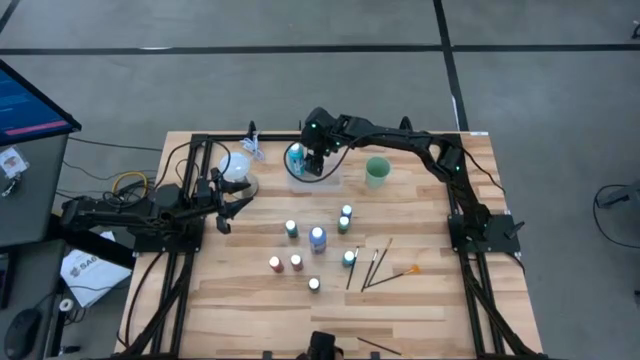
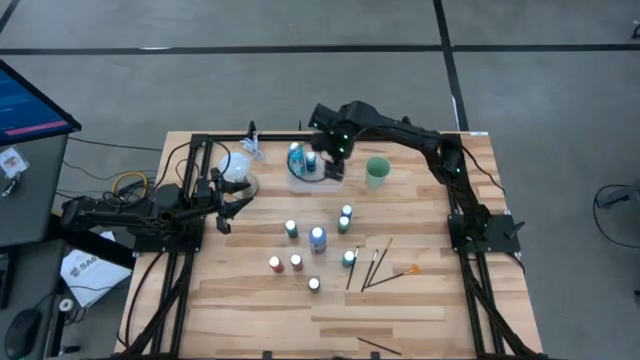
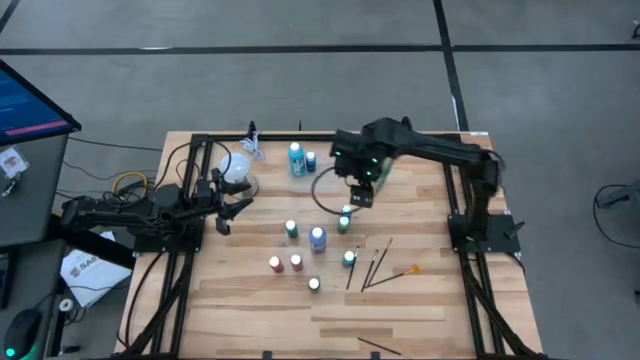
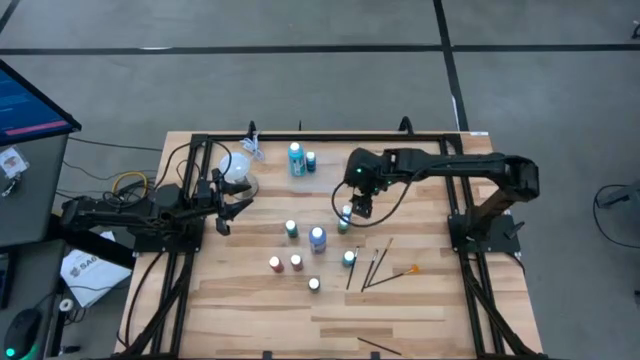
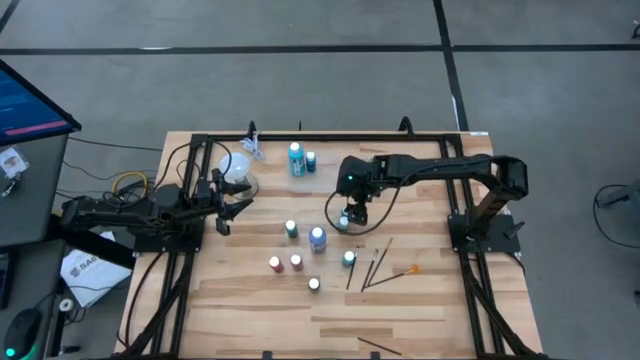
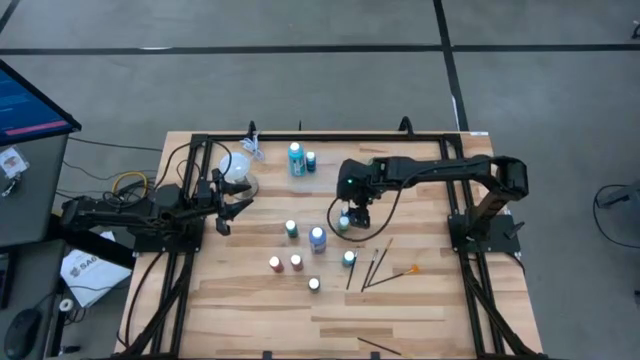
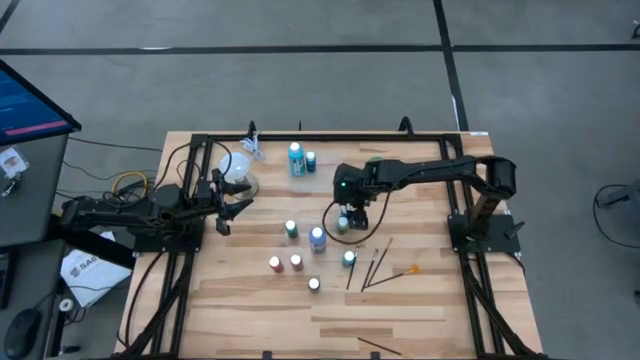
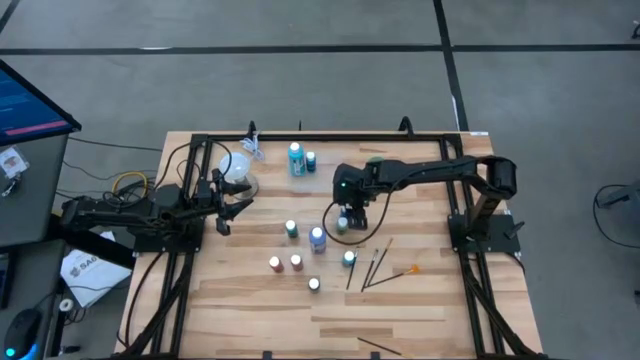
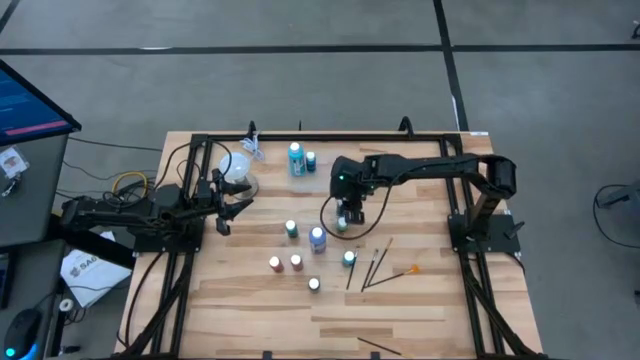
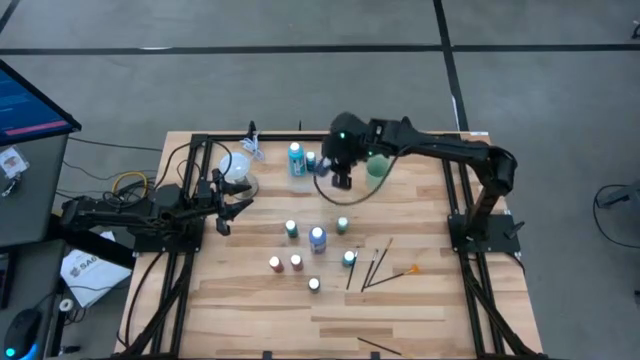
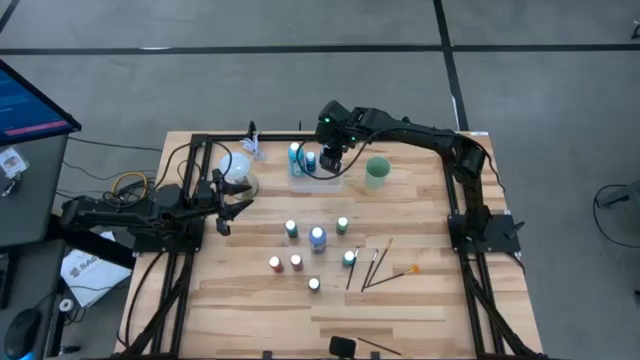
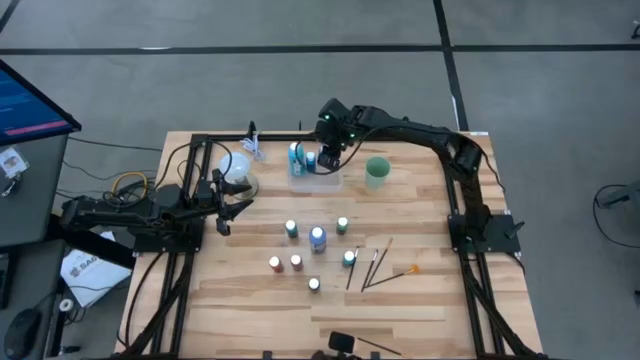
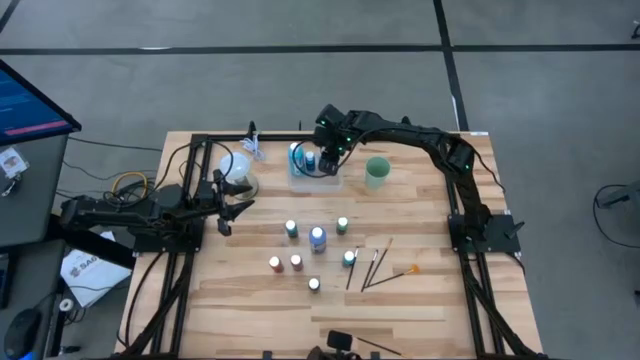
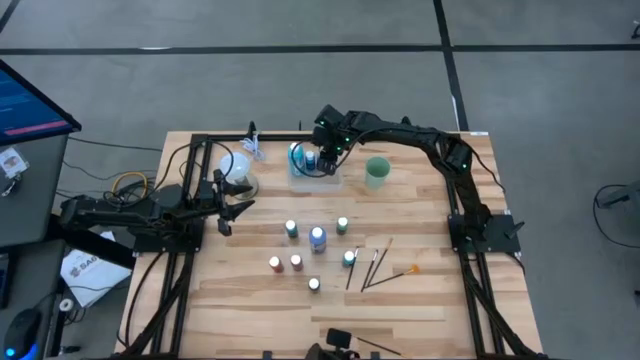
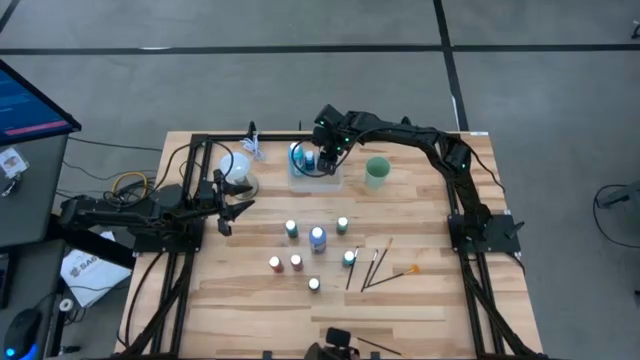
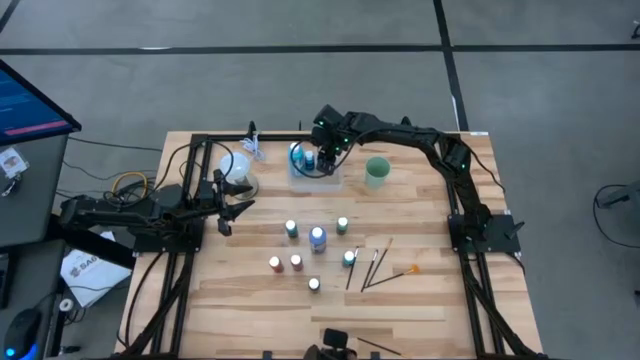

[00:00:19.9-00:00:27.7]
Task: Pick & Place Paint Supplies
Put the small dark blue paint bottle into the bin

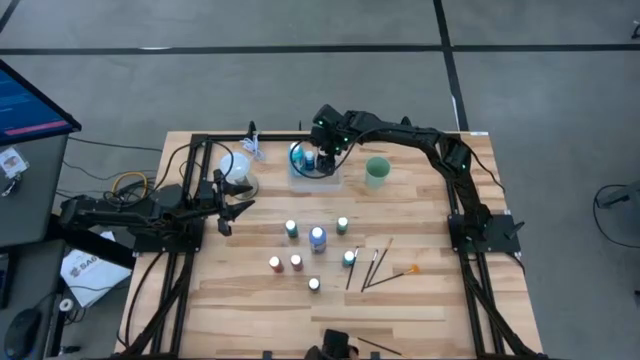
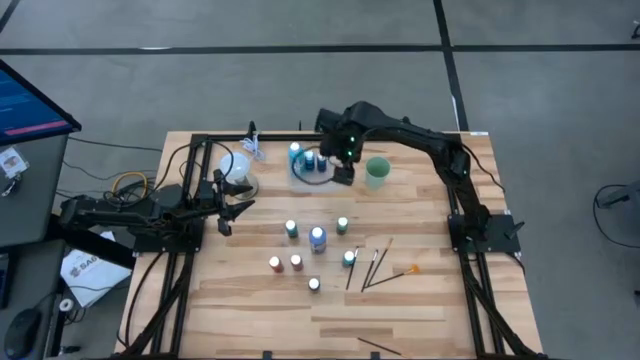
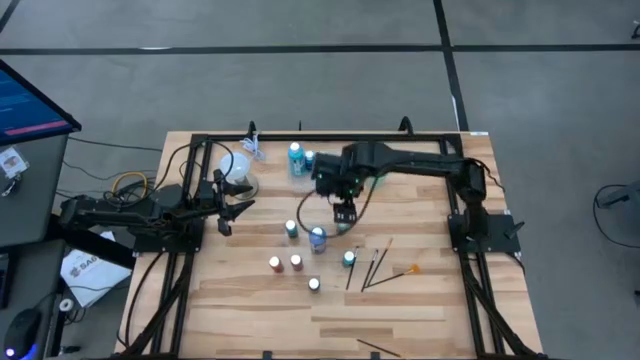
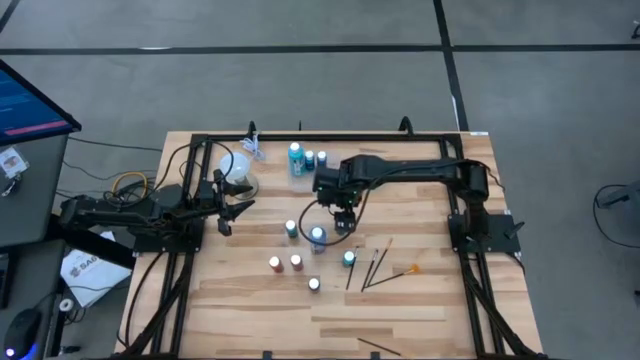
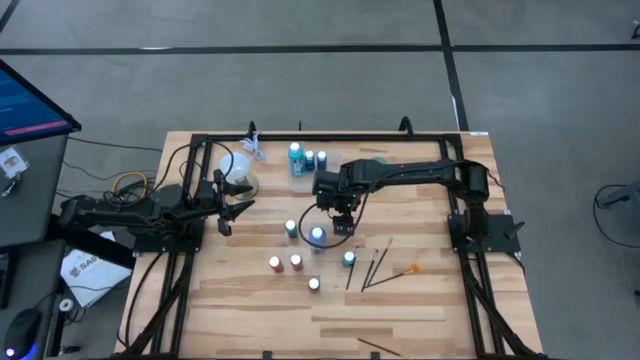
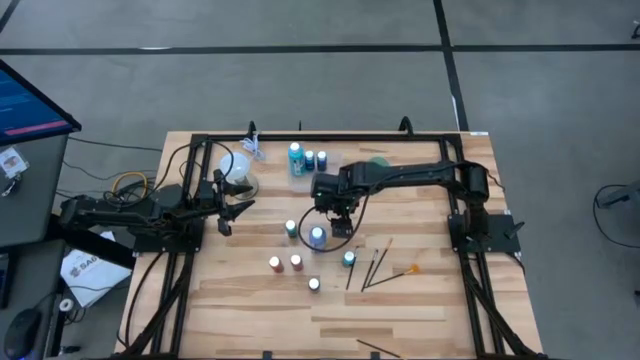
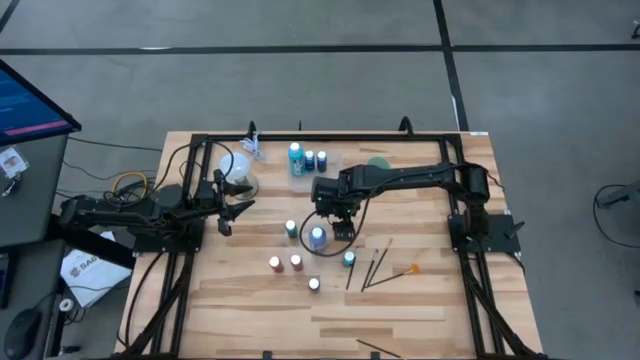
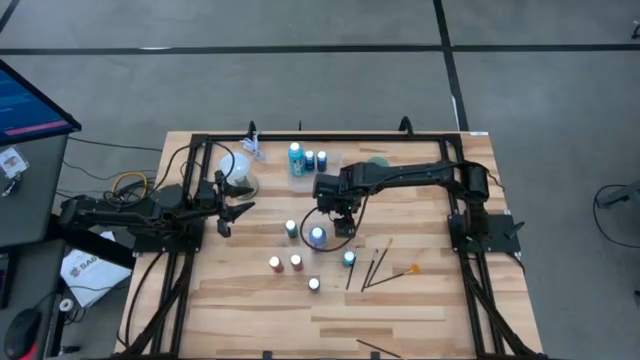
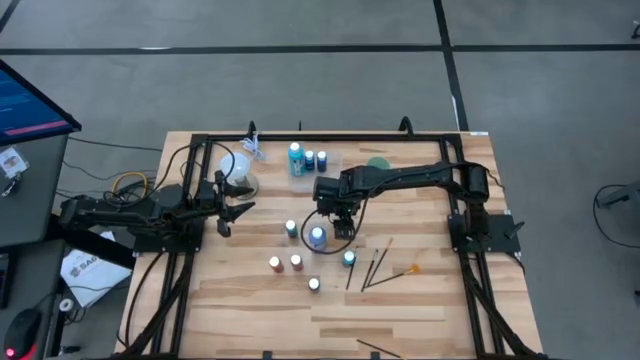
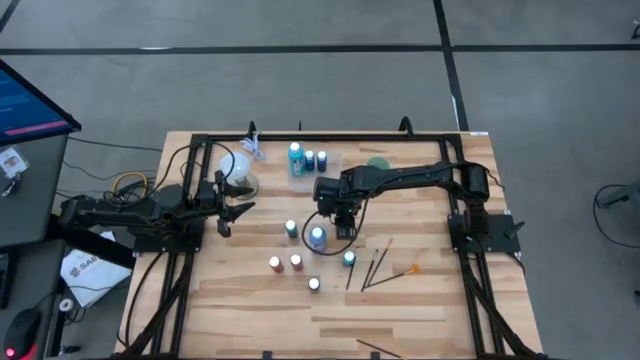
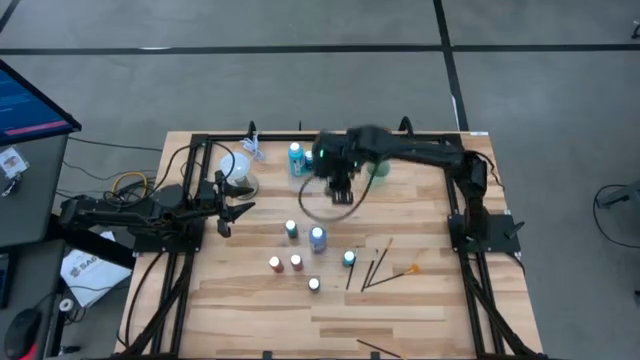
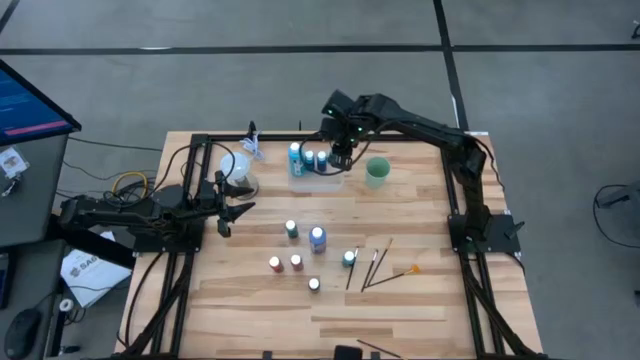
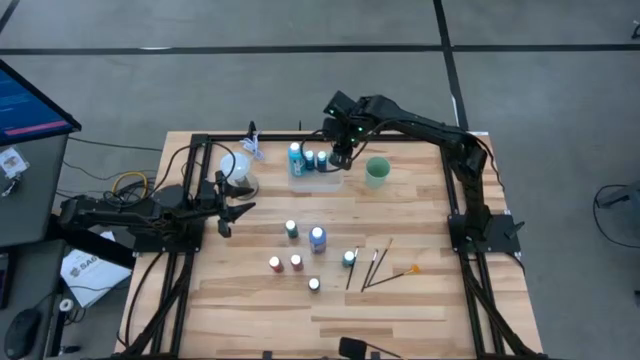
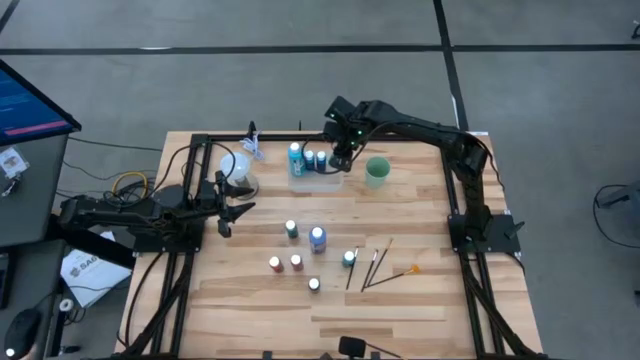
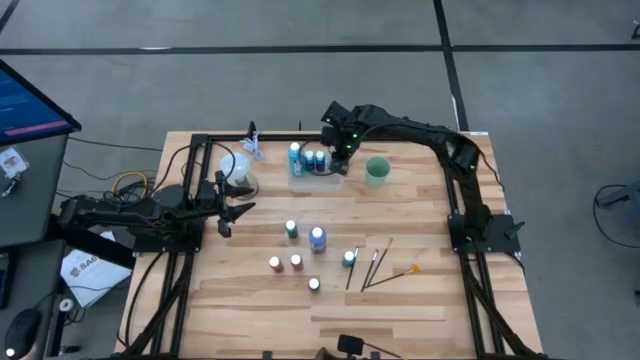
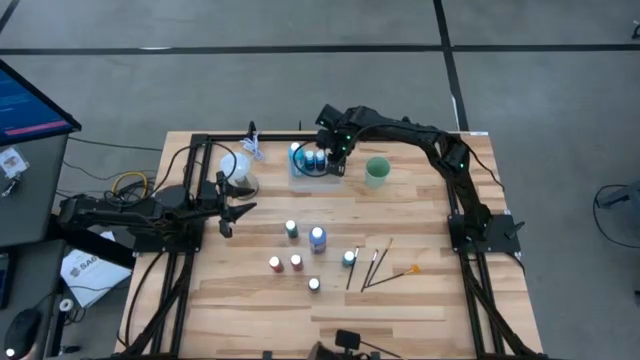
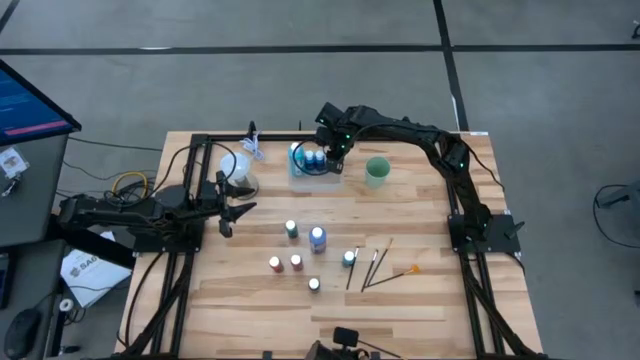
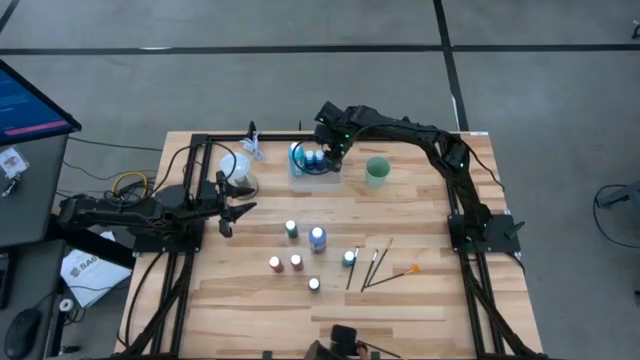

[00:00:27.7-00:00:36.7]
Put the small green paint bottle into the bin

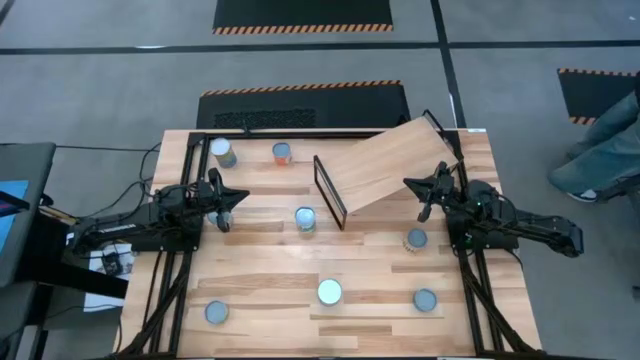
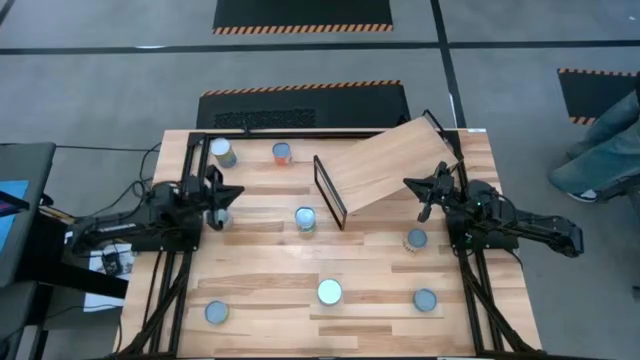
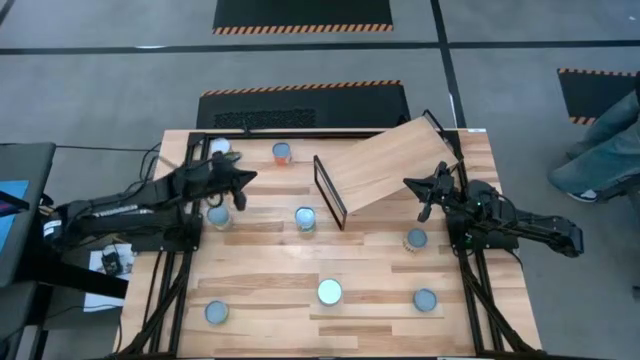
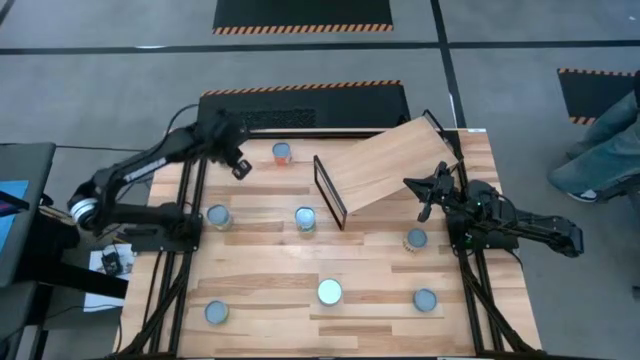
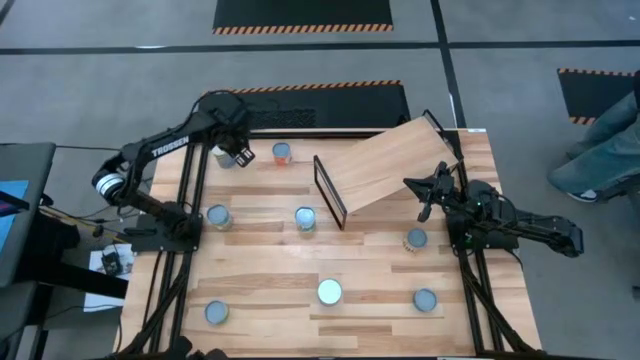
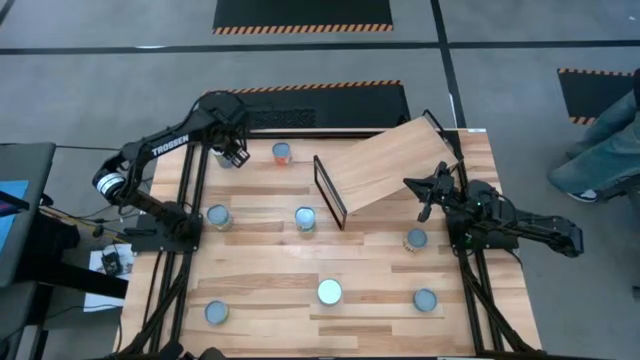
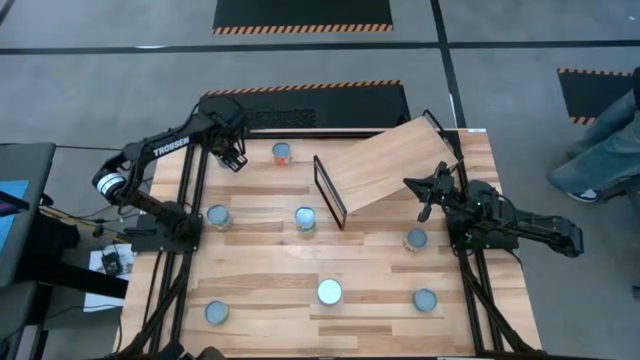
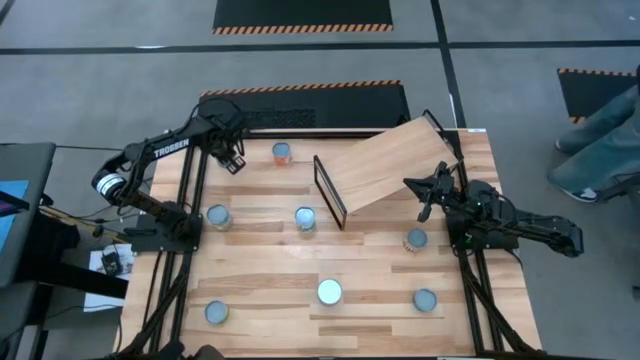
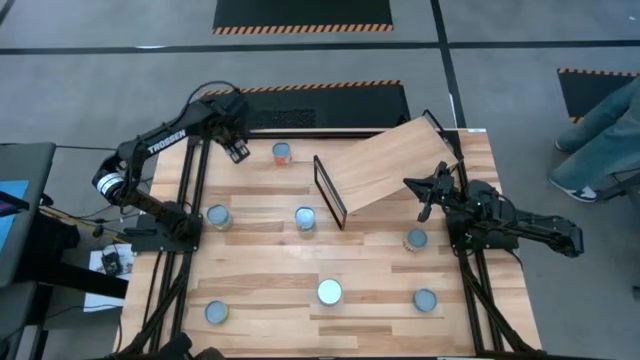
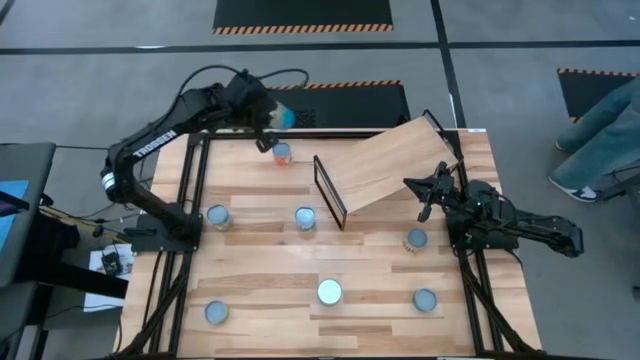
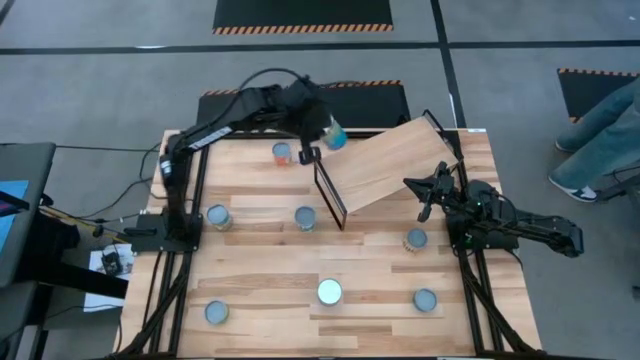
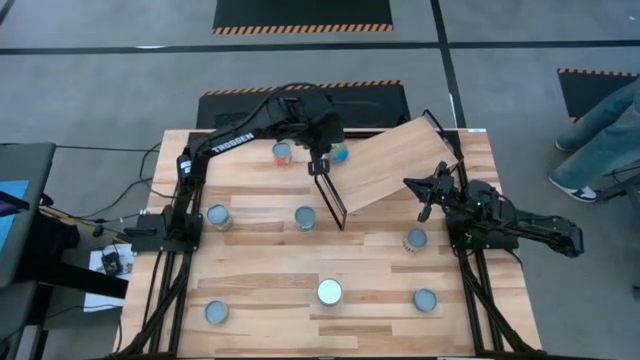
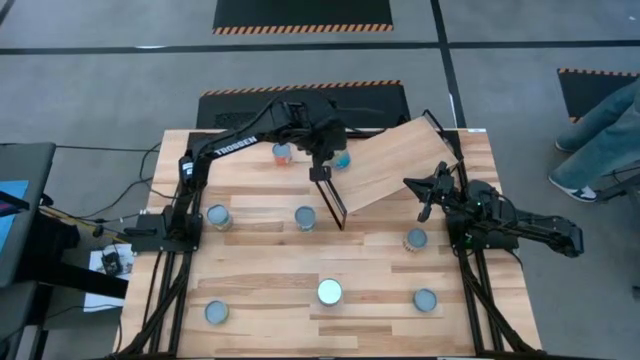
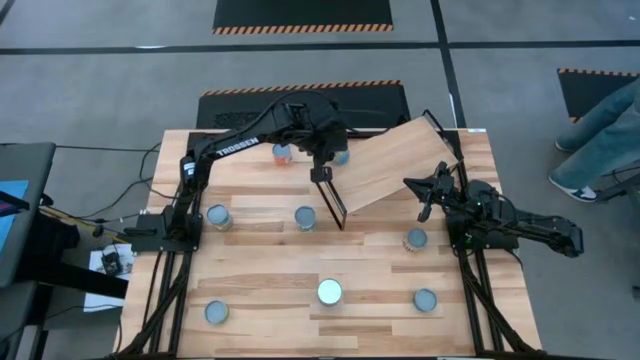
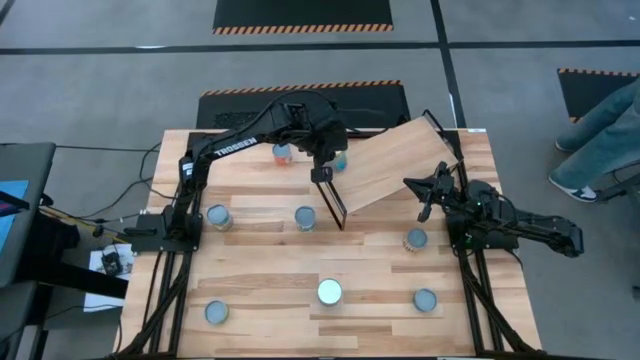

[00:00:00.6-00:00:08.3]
Task: Pick and place cans onto a shelf
Put the top can of cherries on the shelf
